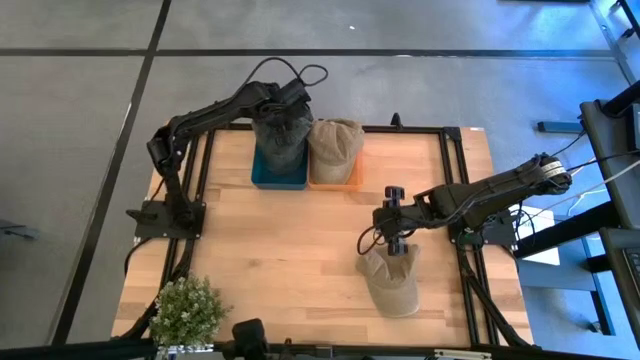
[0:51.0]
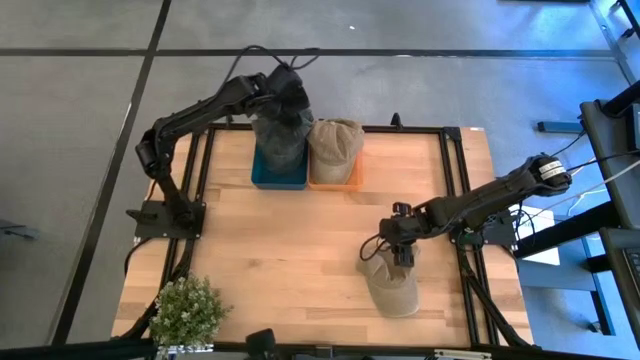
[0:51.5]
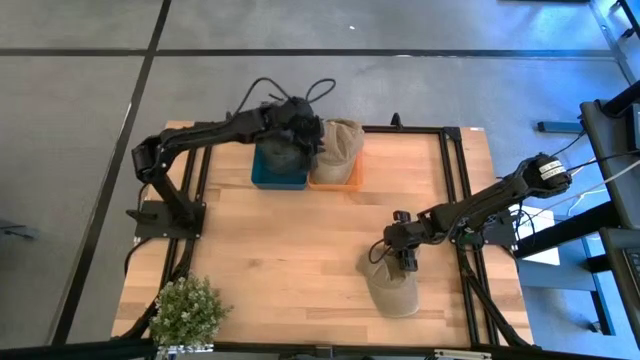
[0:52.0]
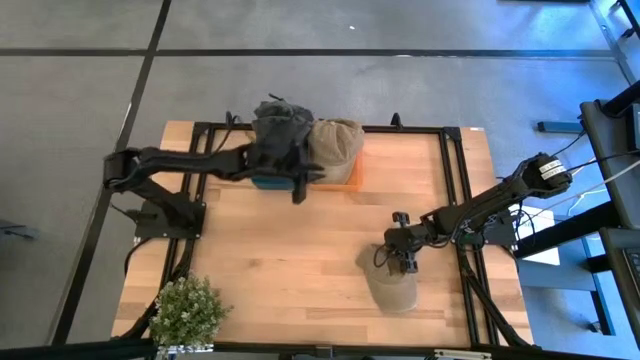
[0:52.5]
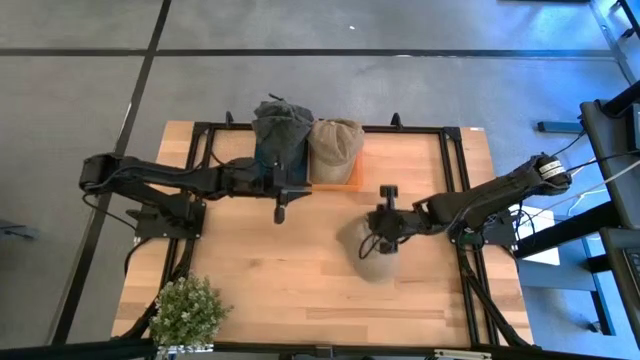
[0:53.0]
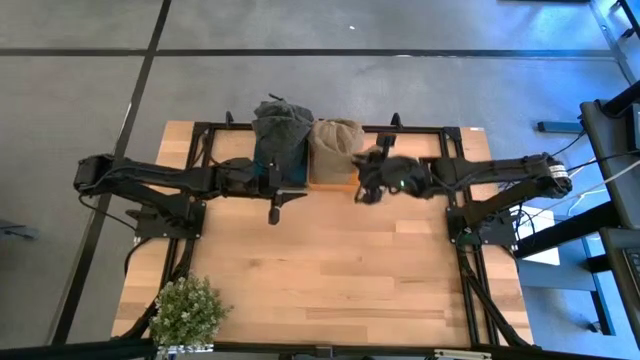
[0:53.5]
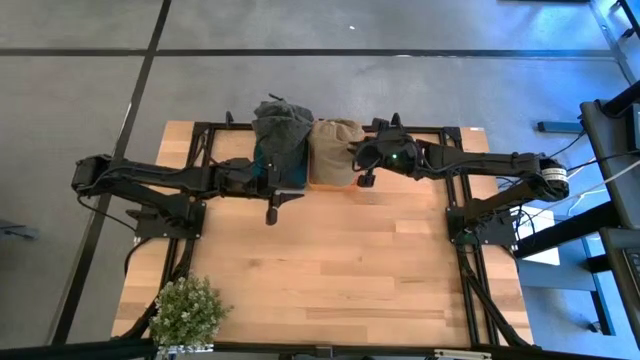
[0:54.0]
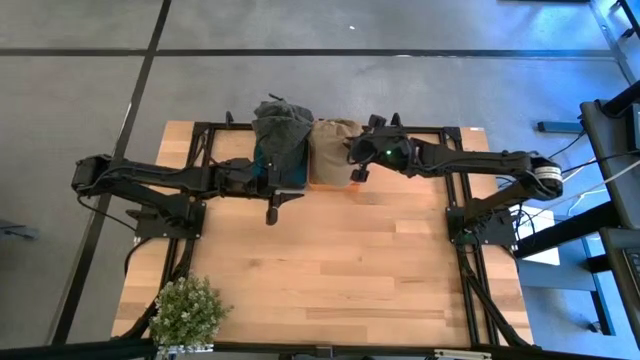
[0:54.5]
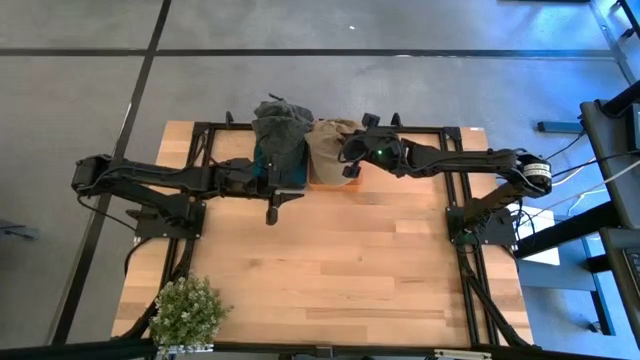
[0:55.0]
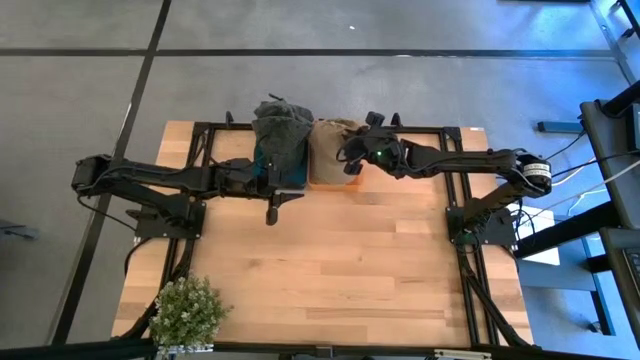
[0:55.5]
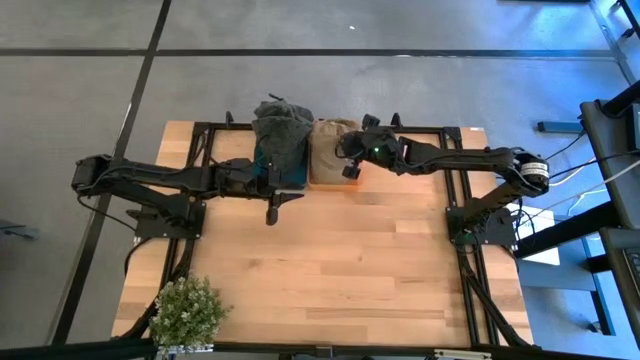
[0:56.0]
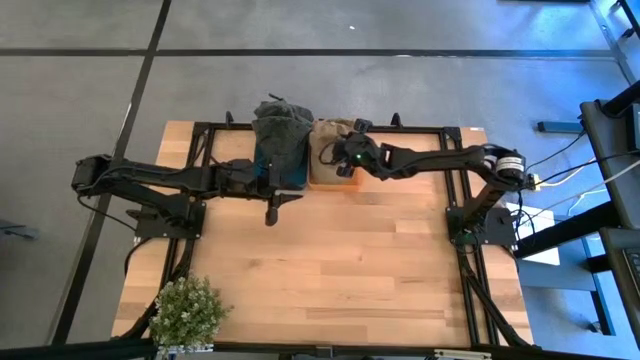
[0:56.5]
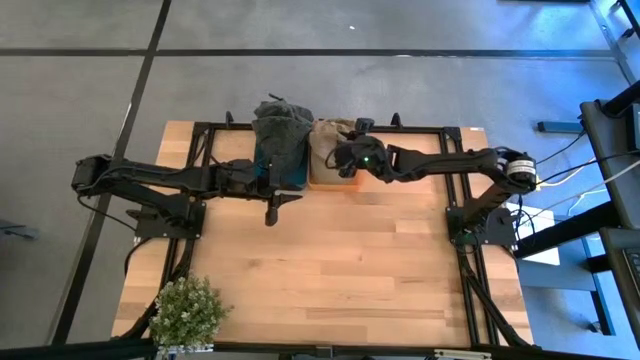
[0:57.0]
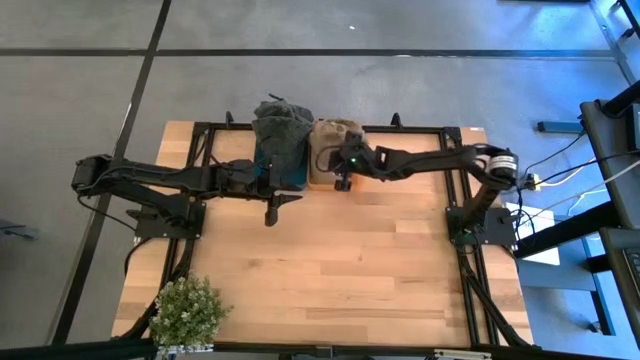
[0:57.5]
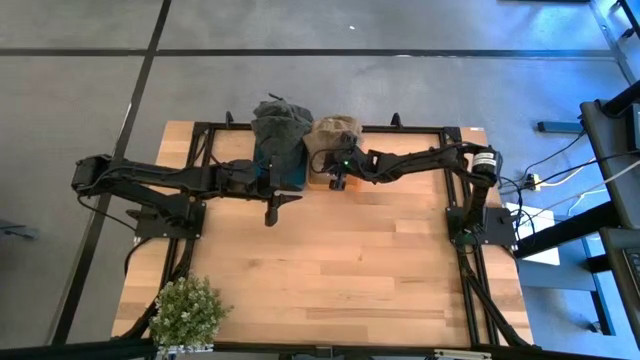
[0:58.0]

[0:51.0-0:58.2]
Task: Pick & Place hat
Put the brown cap into the orange bin

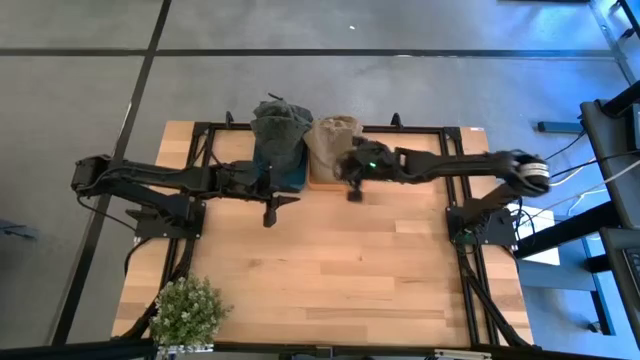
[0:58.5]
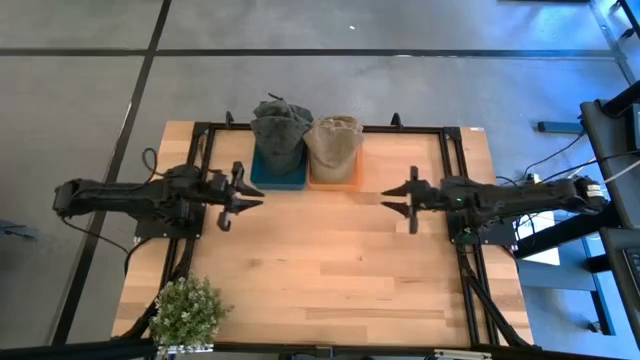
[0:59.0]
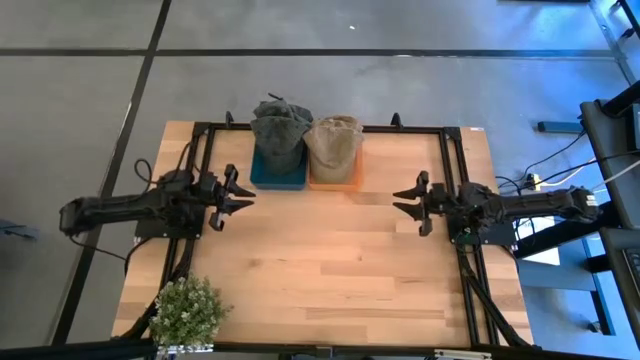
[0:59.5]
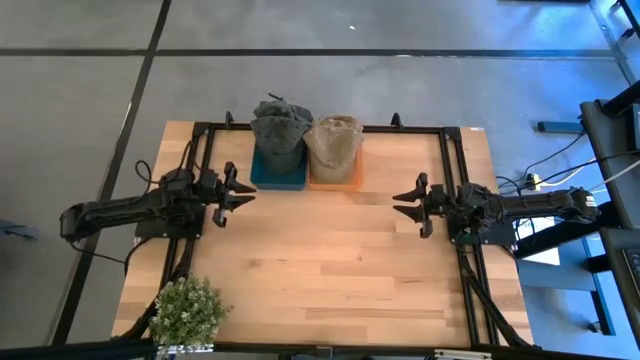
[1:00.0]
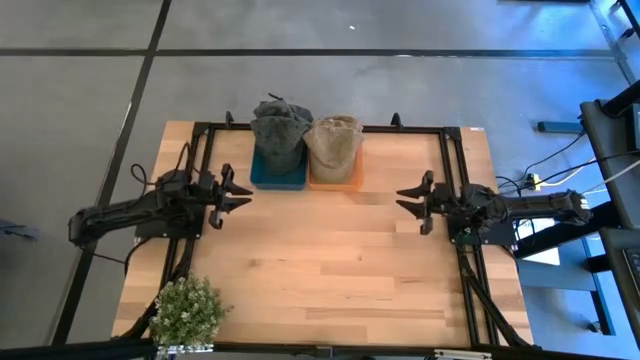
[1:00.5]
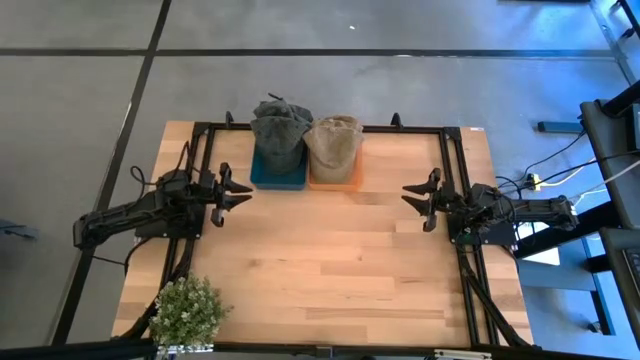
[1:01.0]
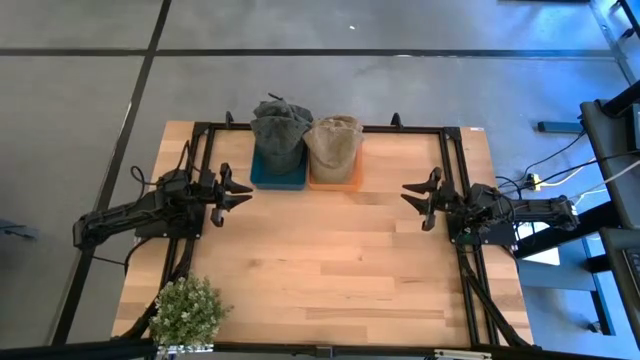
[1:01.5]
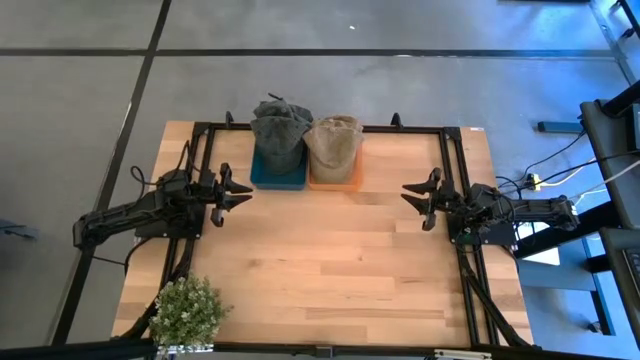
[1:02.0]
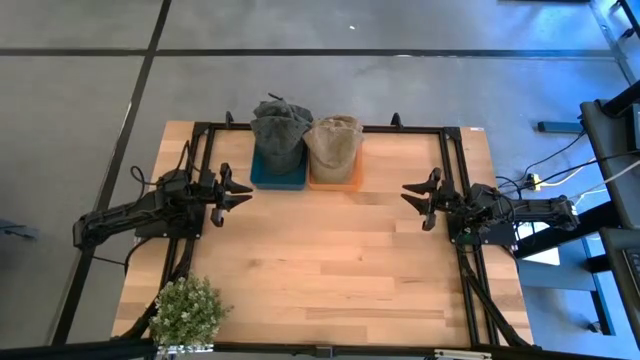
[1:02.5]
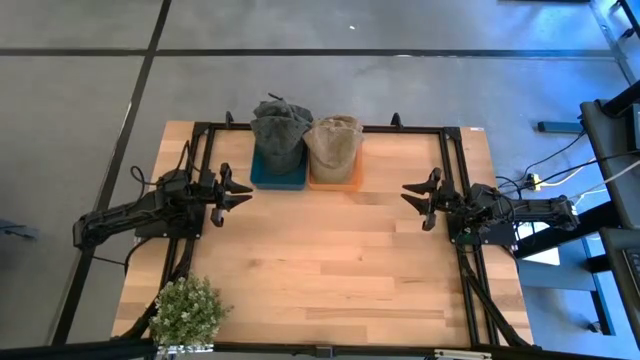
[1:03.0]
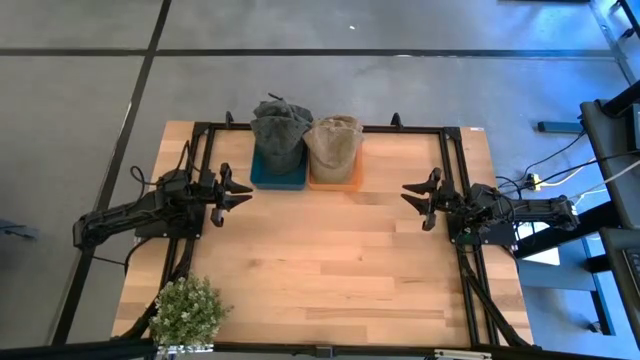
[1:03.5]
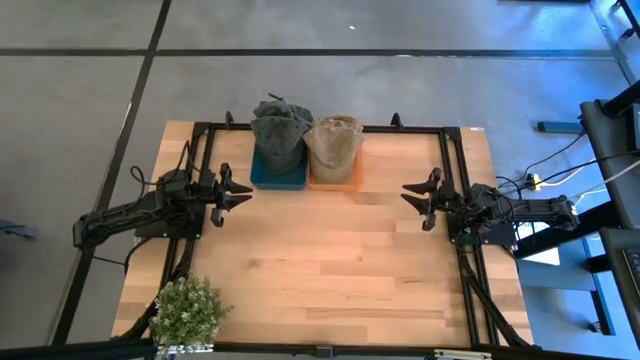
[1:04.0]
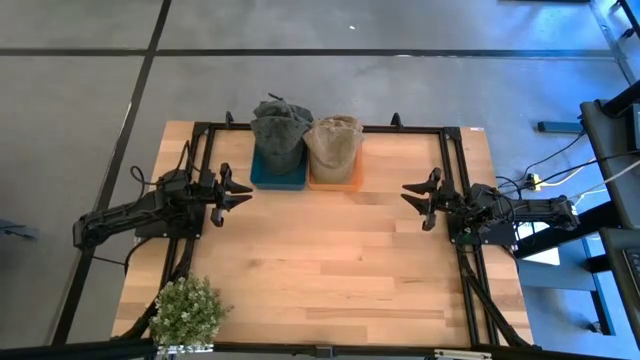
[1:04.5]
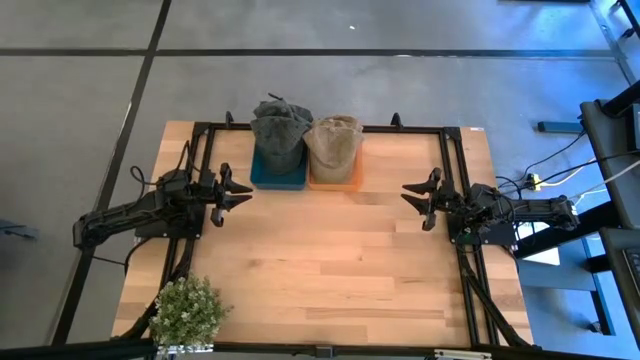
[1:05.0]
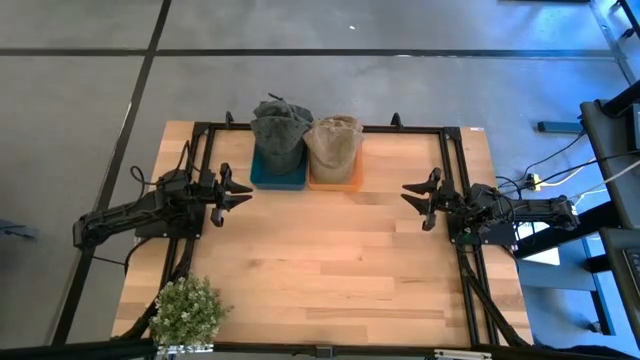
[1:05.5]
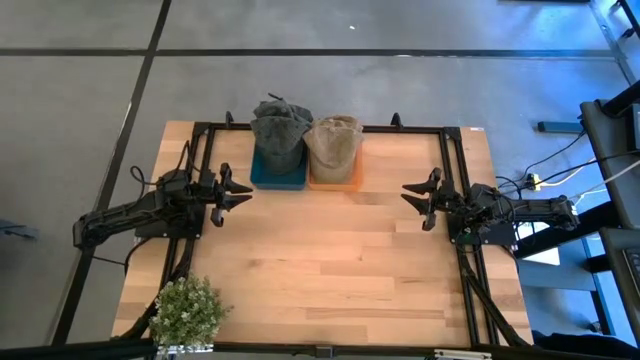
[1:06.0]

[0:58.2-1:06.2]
Return to Home Position

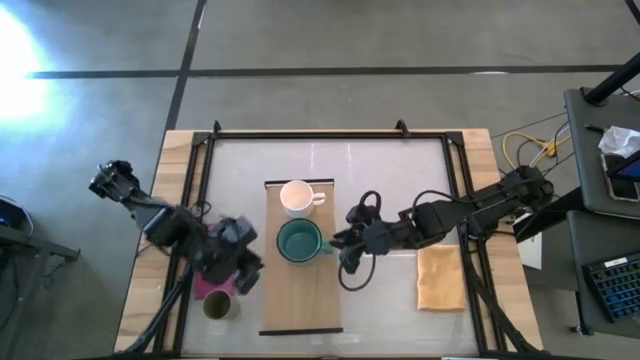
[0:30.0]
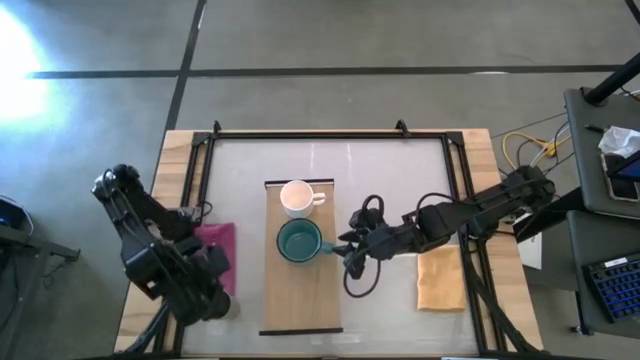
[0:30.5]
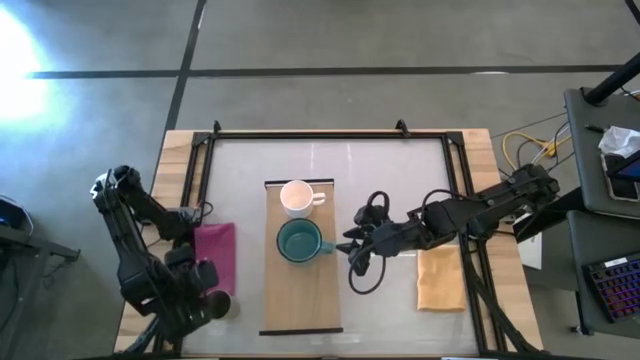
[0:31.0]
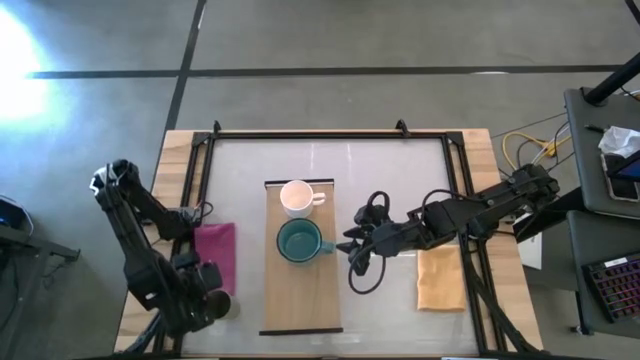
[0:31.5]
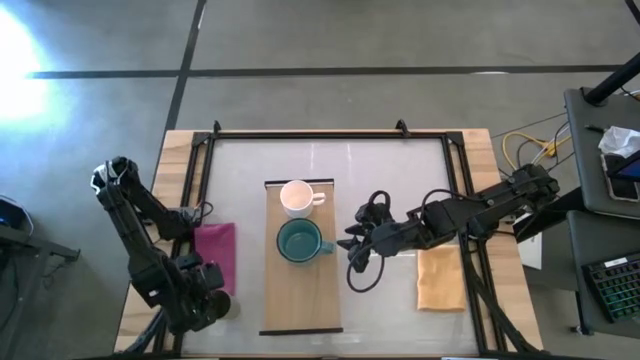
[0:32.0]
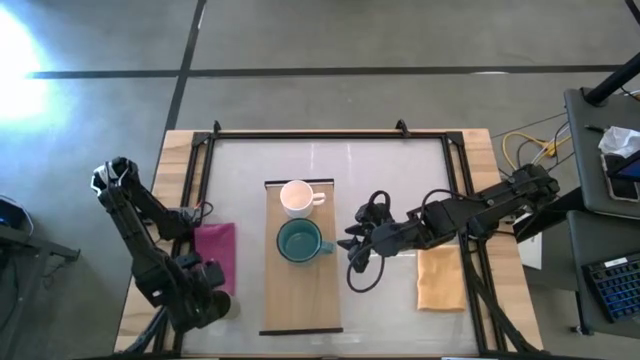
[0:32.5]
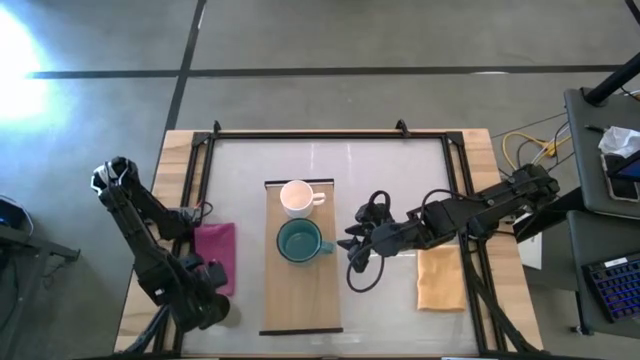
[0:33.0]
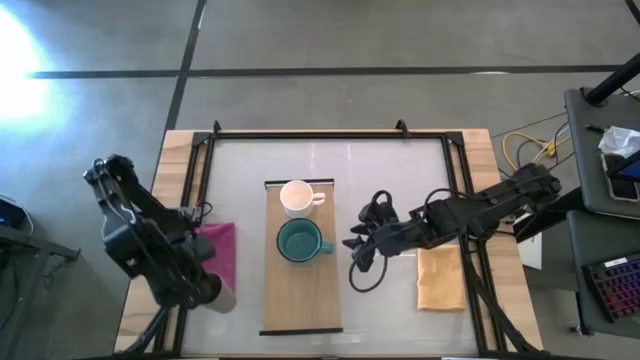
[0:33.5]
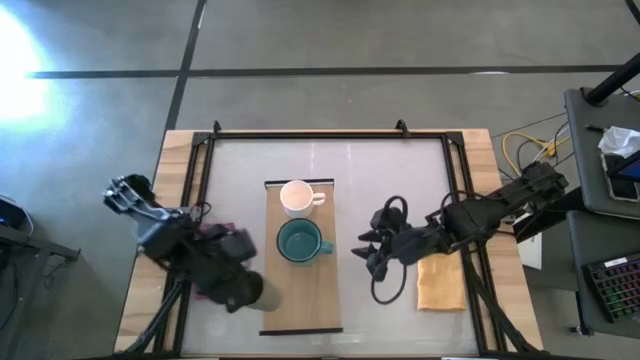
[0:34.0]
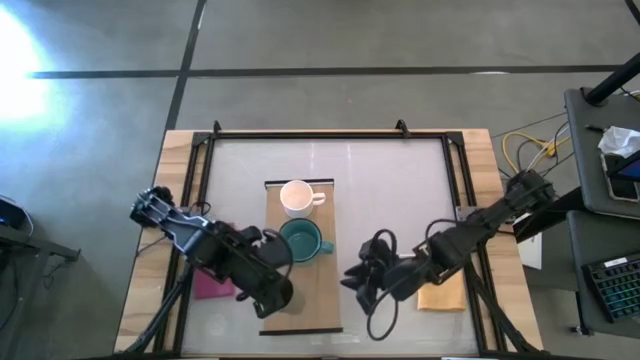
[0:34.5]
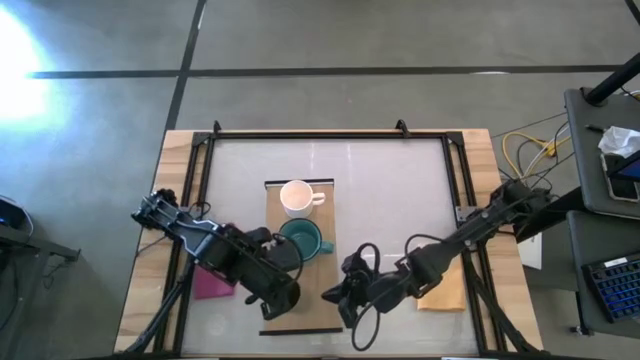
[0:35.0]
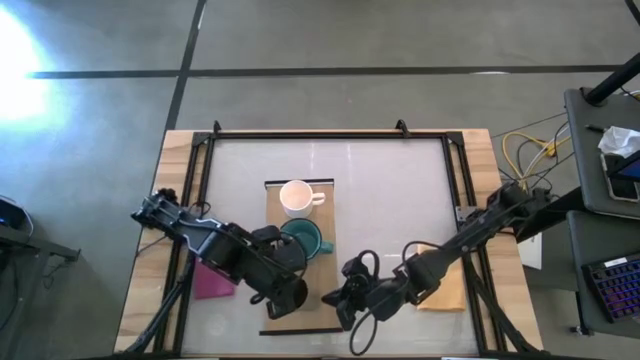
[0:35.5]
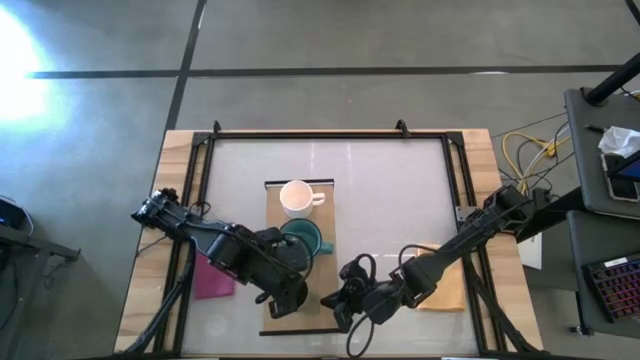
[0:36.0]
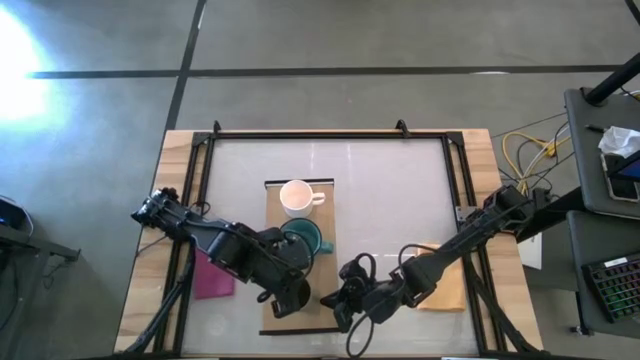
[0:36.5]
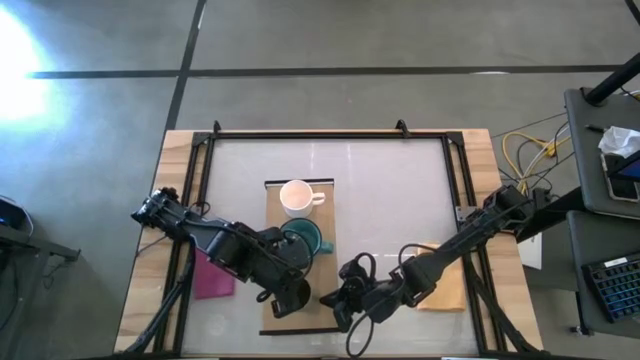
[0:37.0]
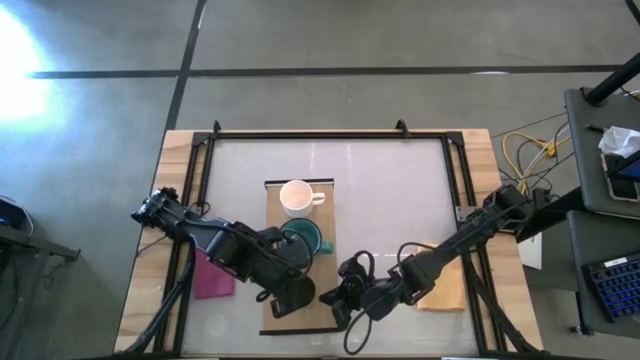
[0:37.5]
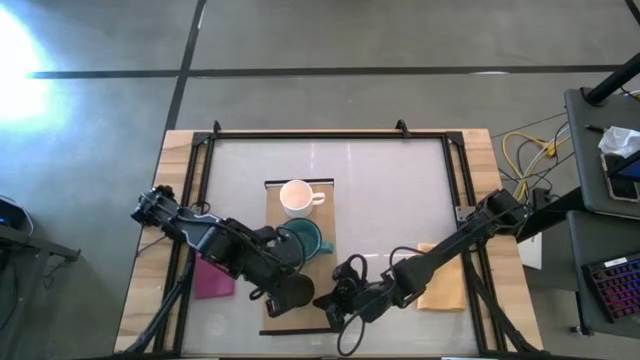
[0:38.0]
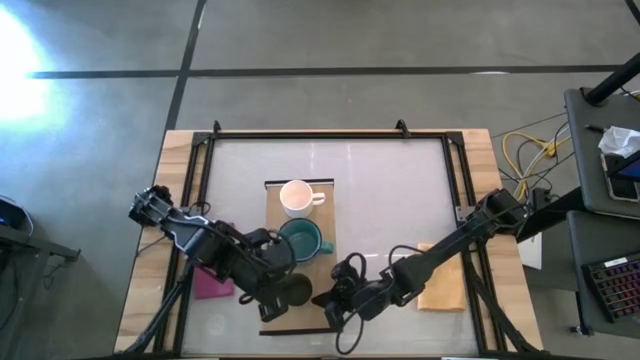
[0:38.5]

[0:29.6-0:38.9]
Task: Stack small to large cups/mugs on shelf
Put the gray cup on the shelf
